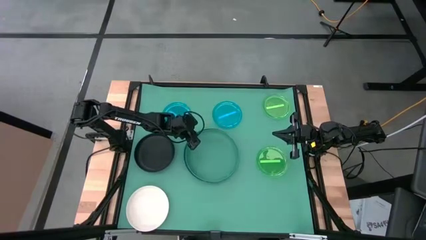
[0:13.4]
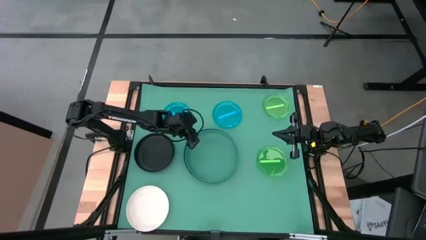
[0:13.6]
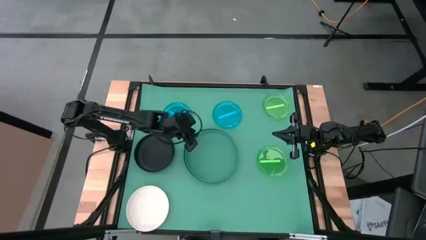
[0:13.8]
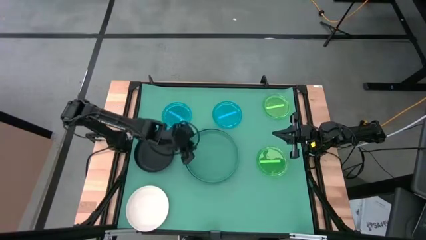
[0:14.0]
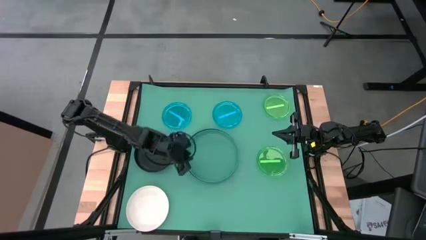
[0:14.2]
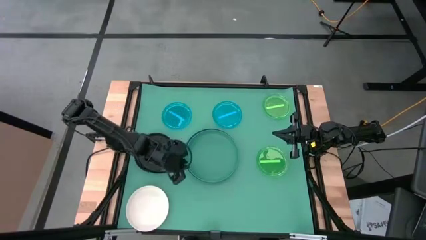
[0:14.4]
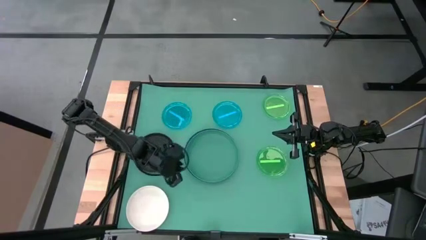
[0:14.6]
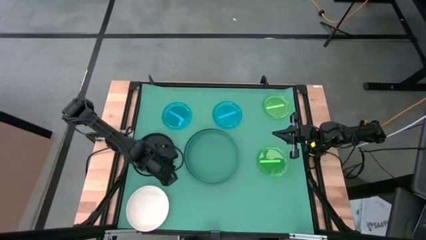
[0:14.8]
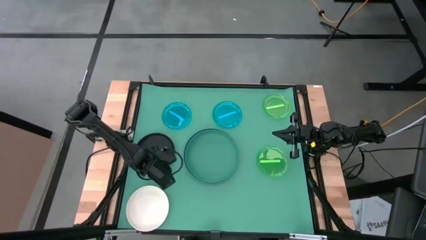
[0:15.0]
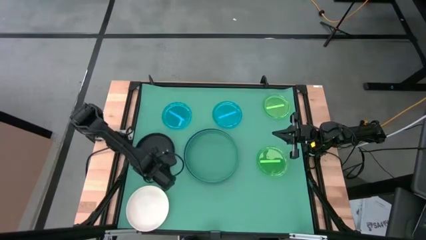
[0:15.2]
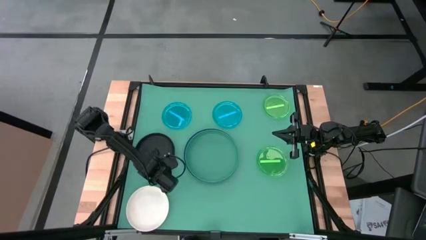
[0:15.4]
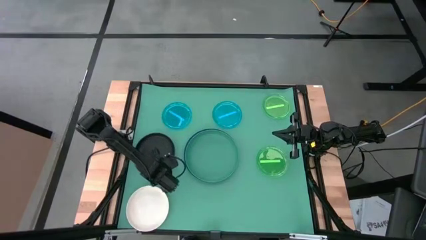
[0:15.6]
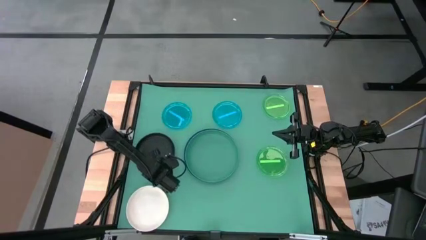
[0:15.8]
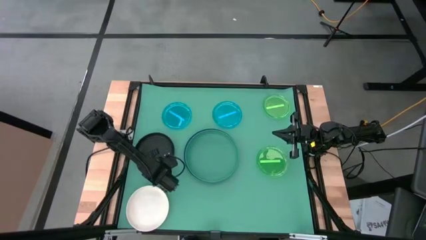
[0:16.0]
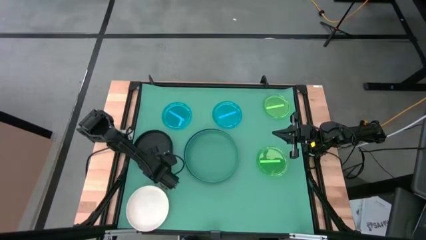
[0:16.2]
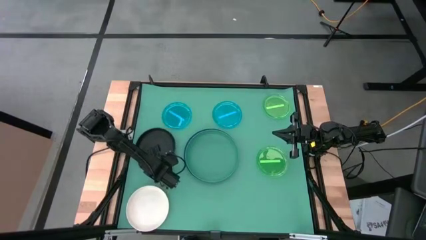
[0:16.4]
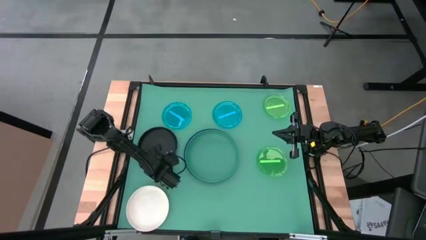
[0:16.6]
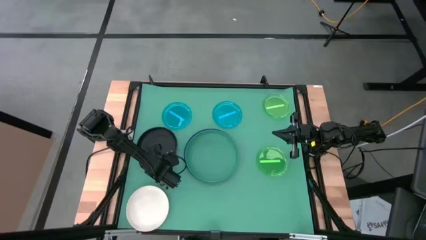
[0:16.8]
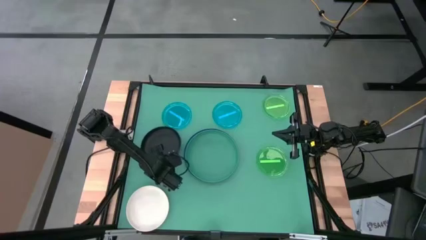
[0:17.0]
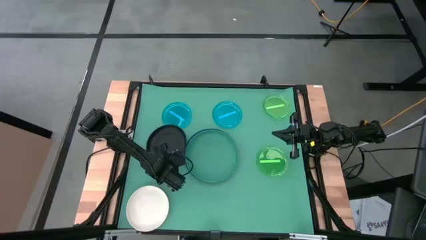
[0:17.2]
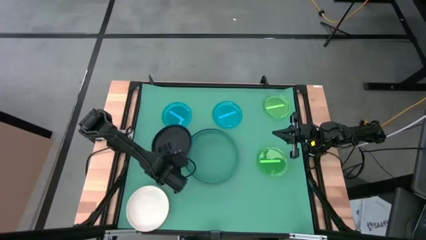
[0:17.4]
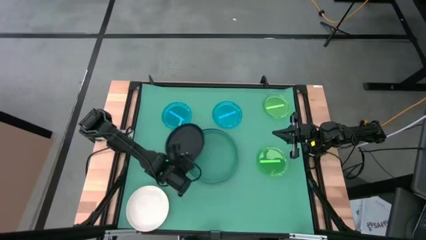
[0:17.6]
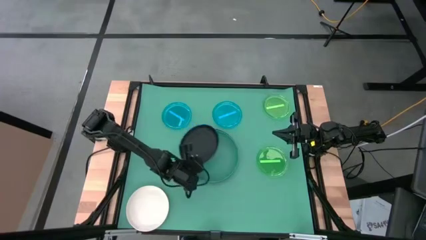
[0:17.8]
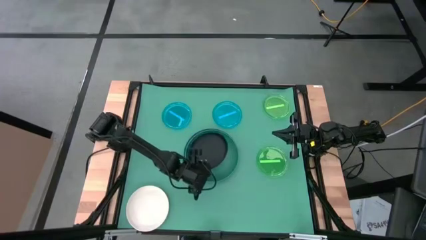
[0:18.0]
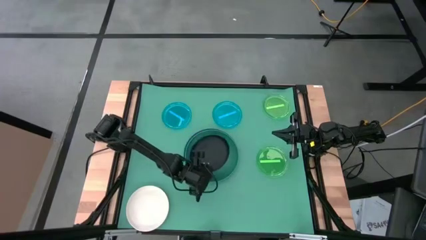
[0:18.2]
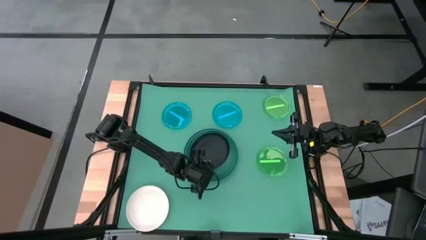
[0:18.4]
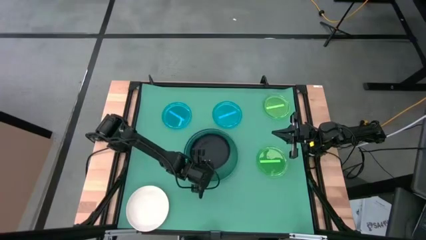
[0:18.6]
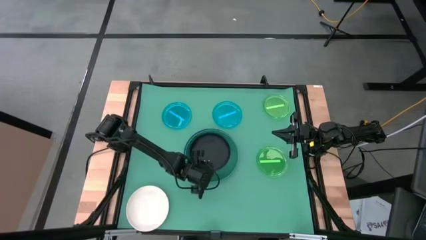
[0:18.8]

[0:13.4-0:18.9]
Task: Stack plastic plates
Stack the black plate on the green plate

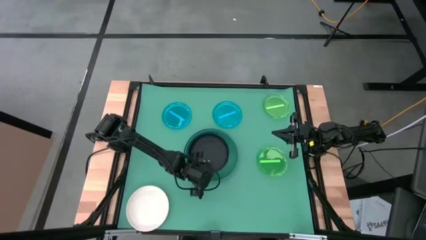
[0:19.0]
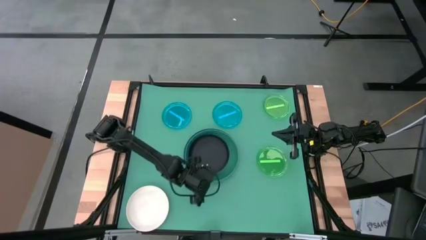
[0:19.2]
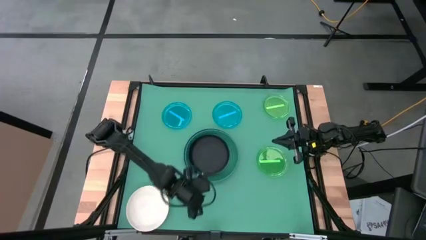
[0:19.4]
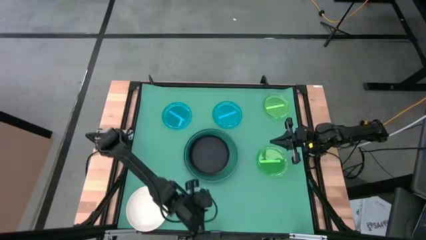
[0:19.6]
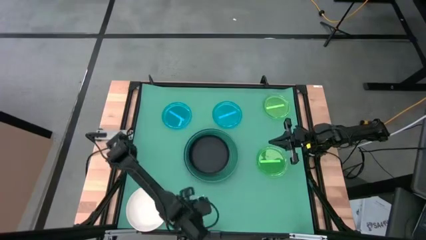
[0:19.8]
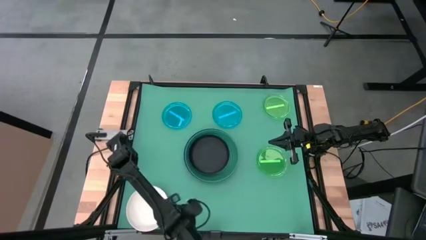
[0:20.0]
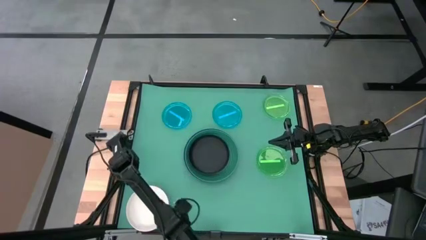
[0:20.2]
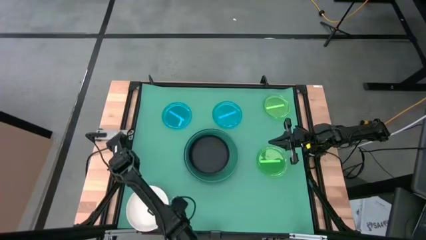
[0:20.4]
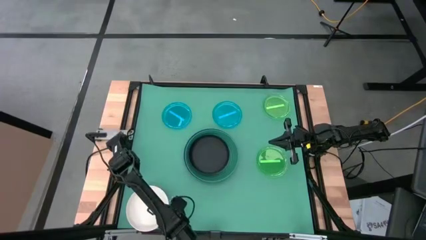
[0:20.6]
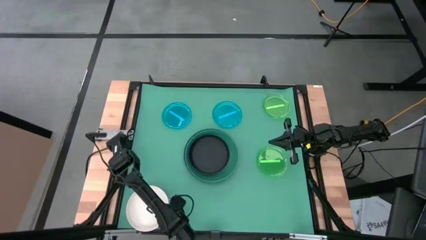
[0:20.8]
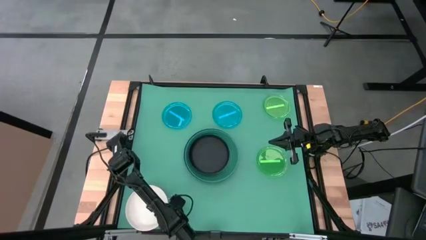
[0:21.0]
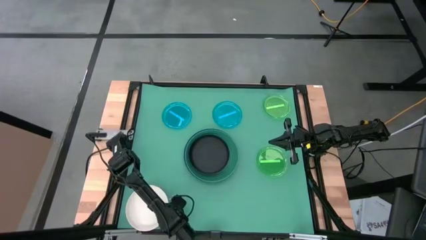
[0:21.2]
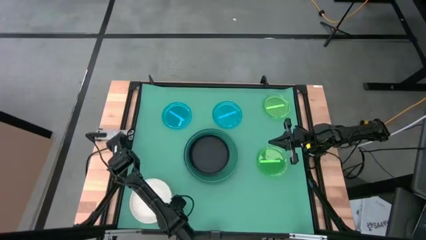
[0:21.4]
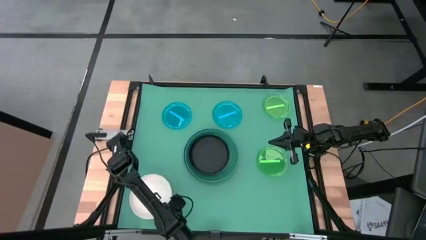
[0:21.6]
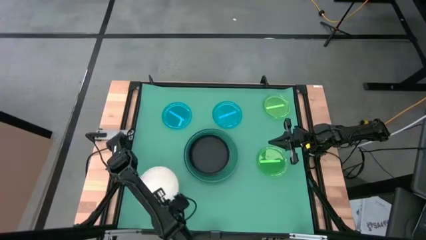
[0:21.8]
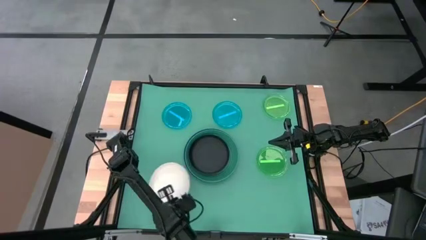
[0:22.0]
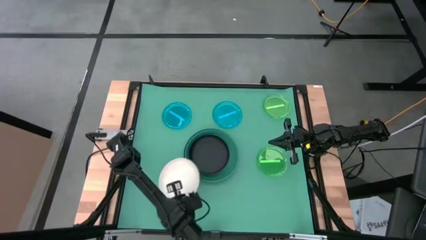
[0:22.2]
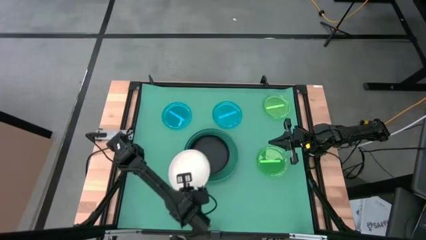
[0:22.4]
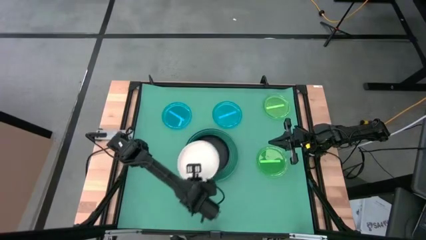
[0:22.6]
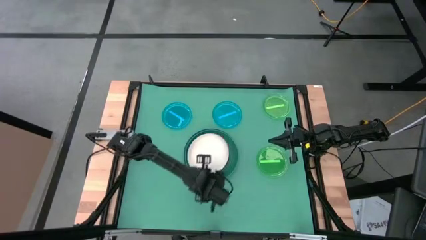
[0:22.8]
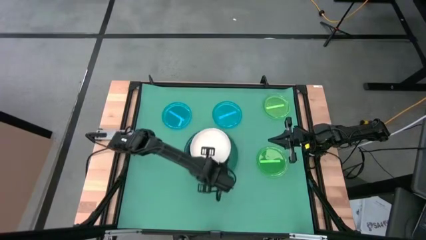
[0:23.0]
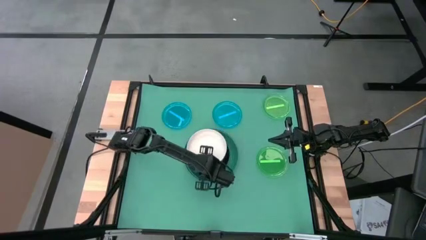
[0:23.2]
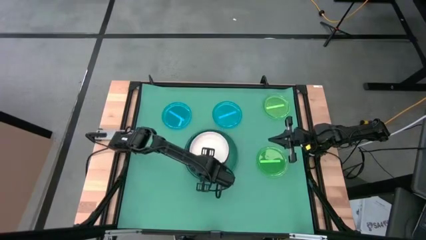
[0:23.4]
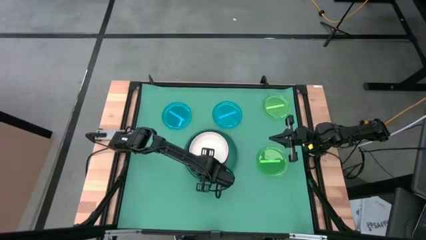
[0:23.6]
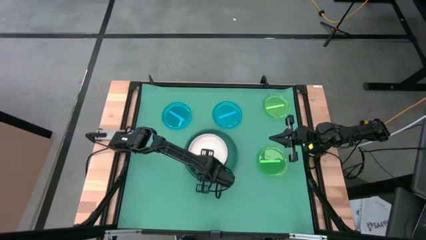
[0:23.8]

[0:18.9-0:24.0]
Stack the white plate on the black plate

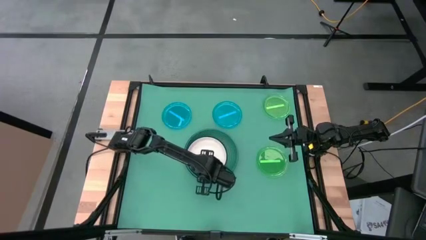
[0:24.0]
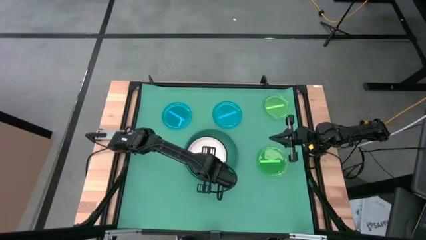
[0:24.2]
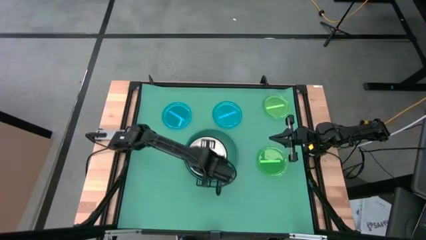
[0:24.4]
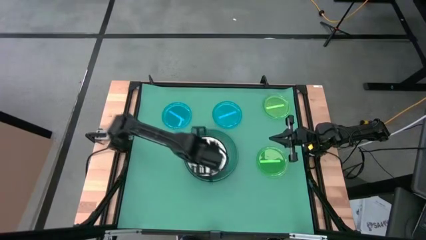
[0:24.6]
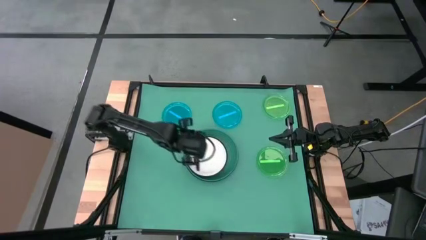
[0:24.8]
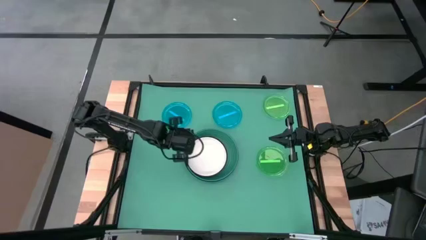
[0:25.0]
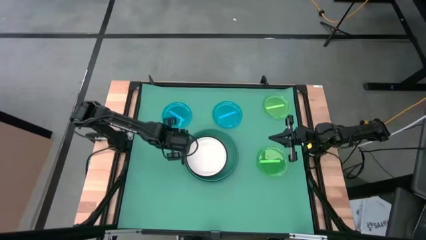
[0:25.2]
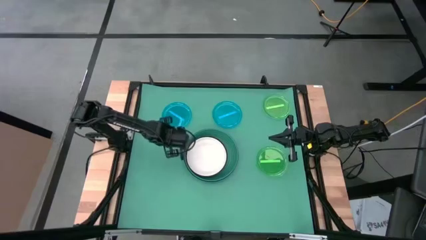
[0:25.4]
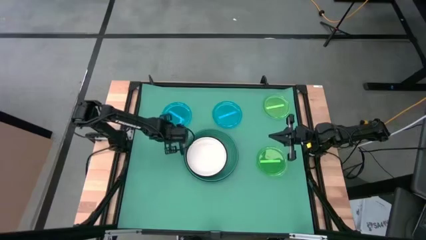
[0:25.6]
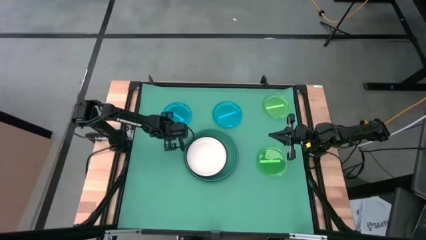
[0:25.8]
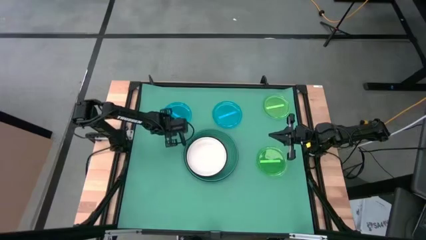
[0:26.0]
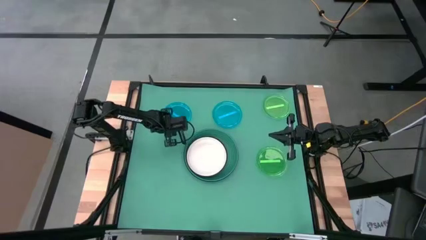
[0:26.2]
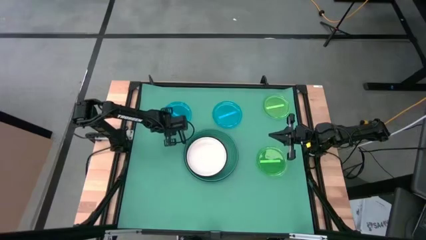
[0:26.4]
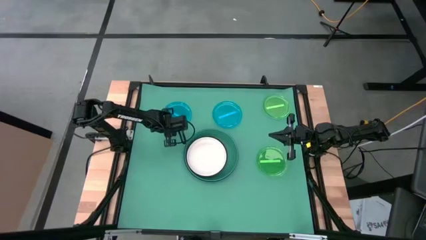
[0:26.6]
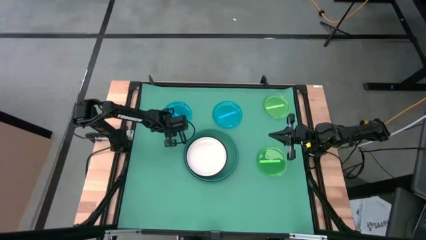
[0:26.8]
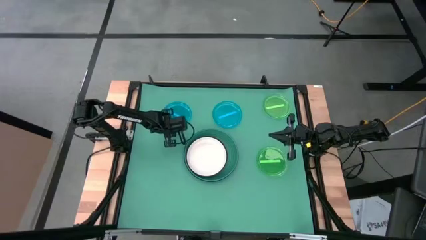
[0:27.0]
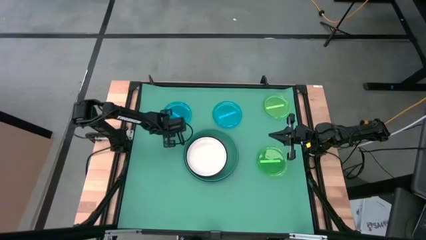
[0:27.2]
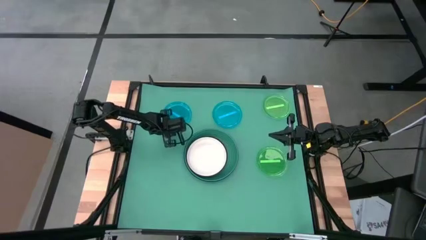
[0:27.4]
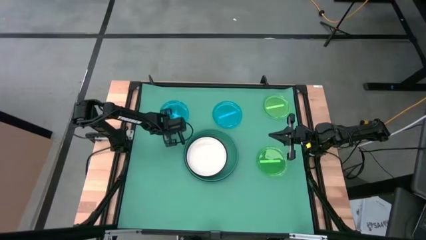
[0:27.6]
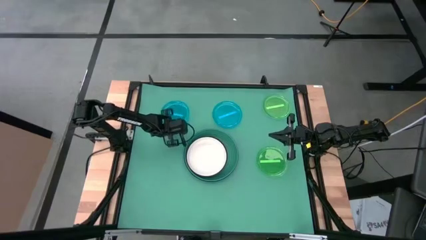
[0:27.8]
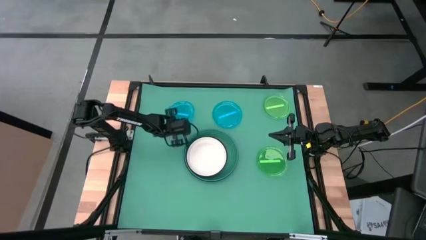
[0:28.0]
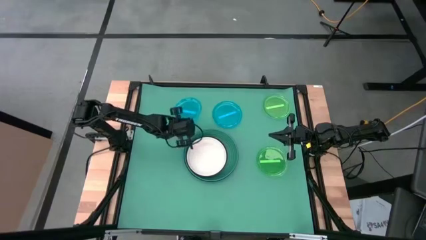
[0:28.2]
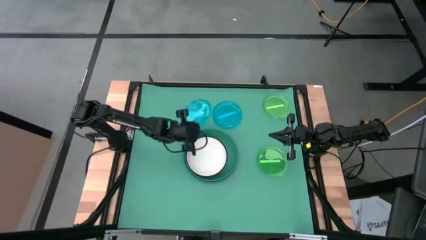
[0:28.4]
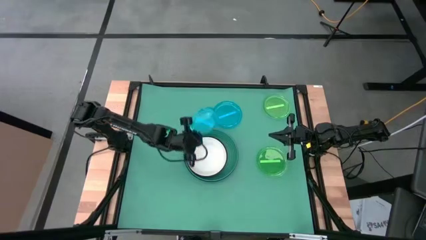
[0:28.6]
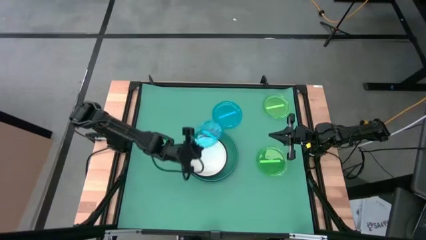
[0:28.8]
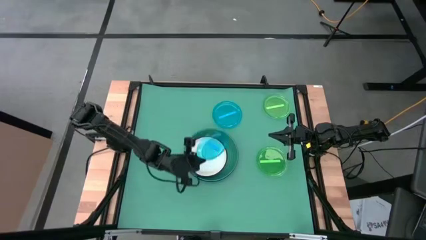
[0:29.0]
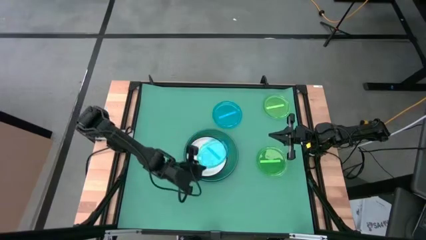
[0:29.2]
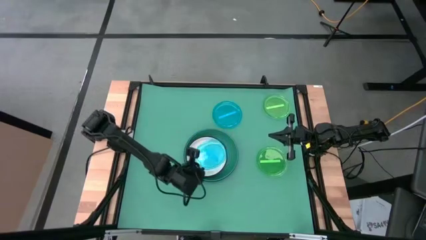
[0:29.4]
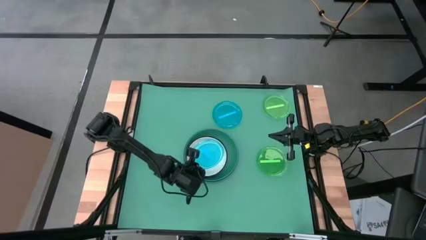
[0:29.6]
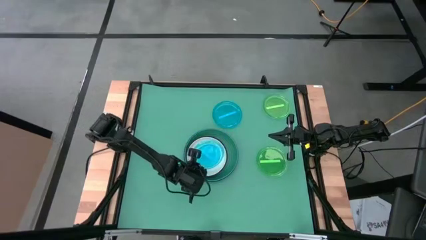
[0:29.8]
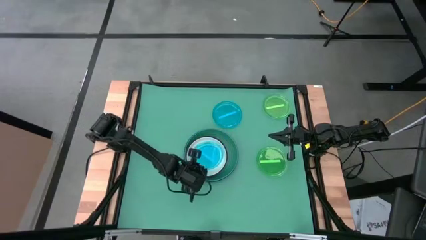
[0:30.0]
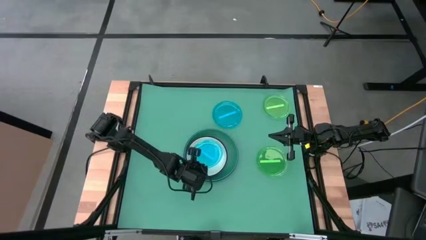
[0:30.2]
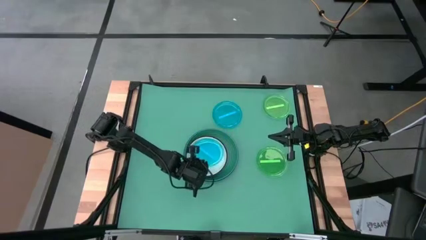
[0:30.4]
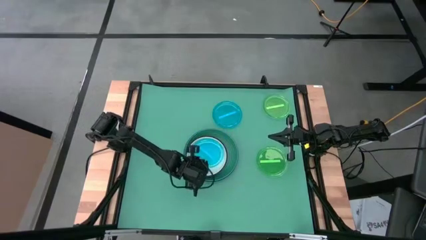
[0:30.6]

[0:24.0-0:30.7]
Stack the left plastic blue plate on the white plate
